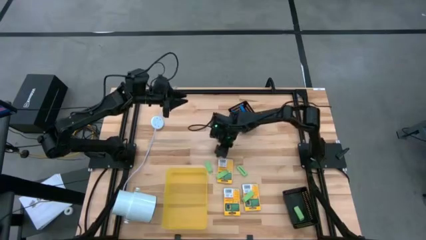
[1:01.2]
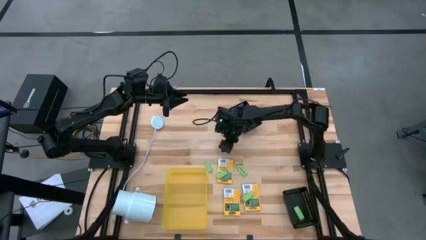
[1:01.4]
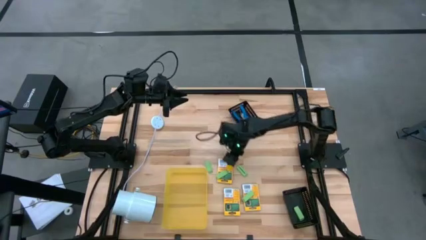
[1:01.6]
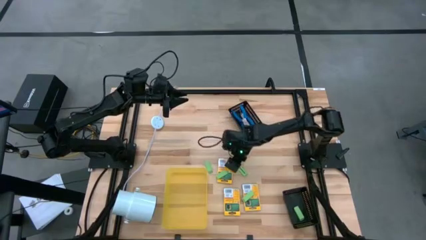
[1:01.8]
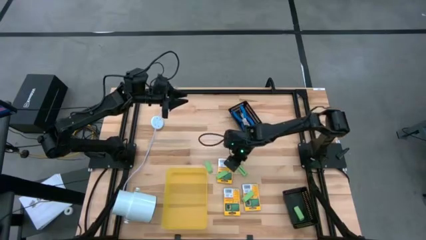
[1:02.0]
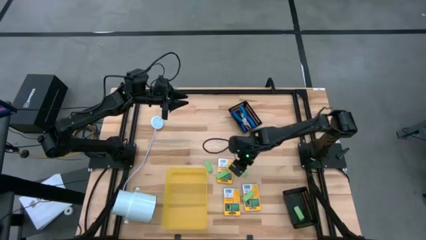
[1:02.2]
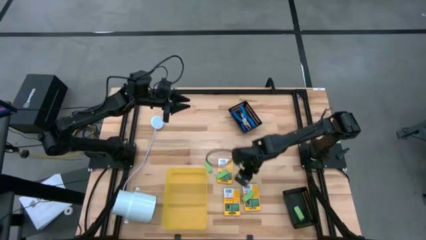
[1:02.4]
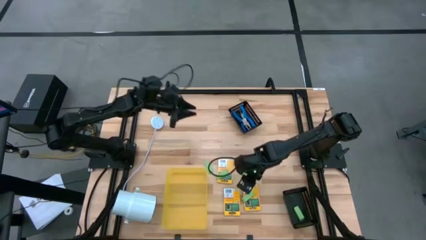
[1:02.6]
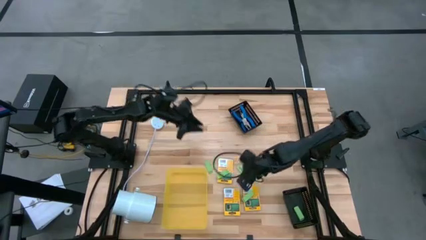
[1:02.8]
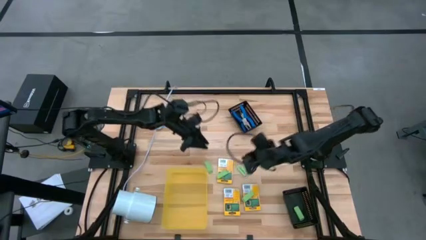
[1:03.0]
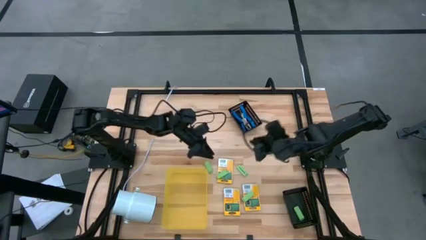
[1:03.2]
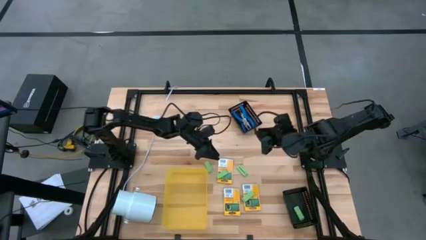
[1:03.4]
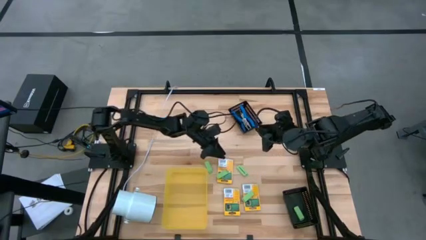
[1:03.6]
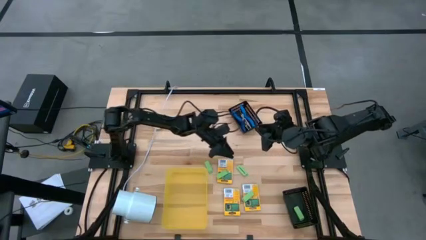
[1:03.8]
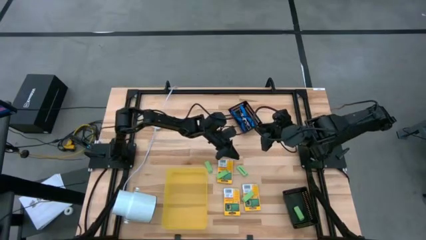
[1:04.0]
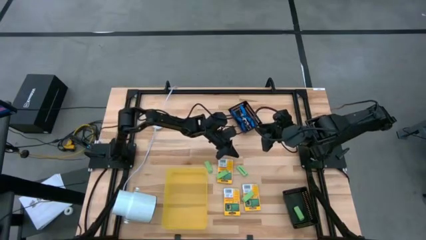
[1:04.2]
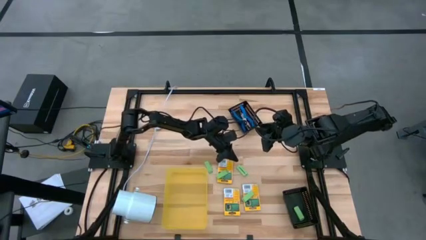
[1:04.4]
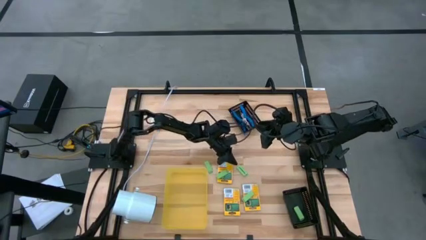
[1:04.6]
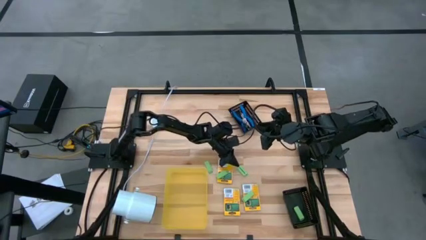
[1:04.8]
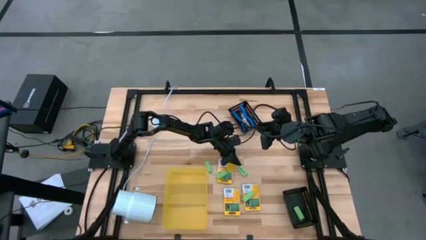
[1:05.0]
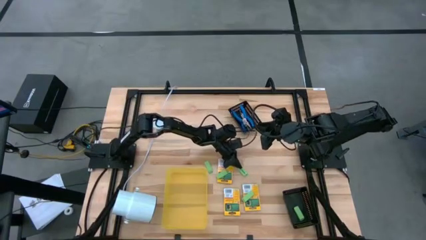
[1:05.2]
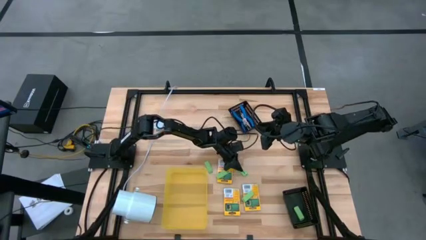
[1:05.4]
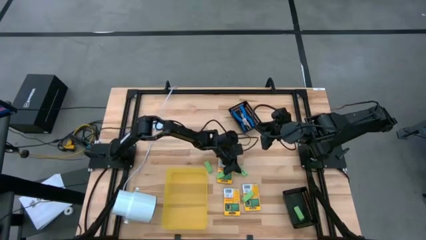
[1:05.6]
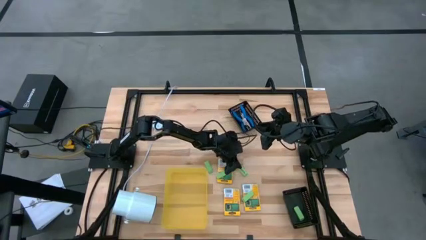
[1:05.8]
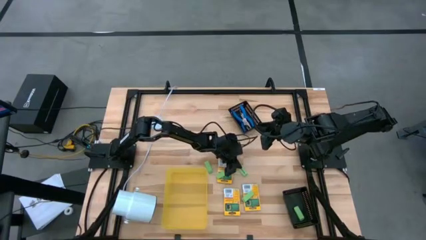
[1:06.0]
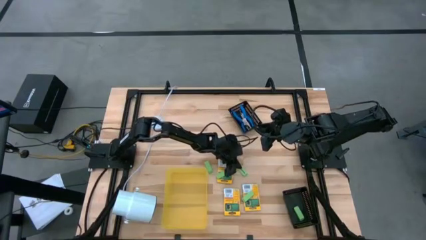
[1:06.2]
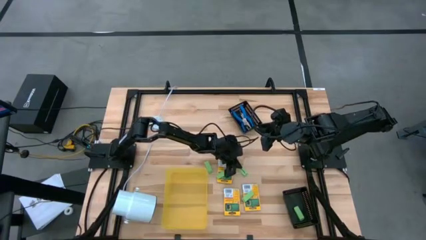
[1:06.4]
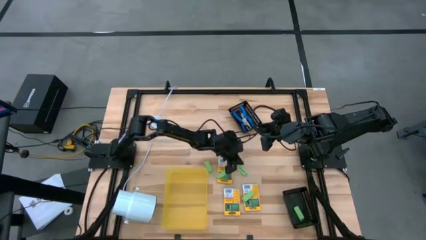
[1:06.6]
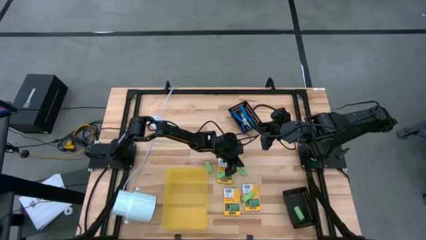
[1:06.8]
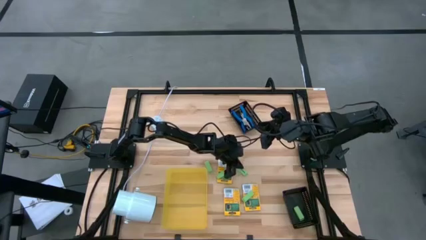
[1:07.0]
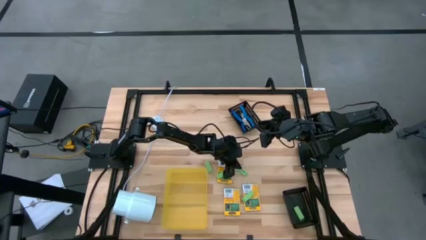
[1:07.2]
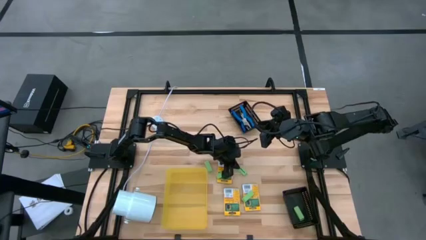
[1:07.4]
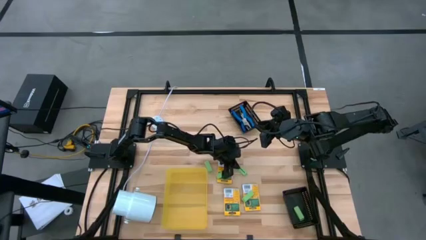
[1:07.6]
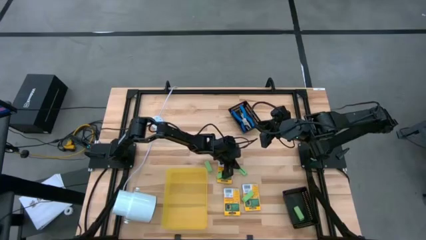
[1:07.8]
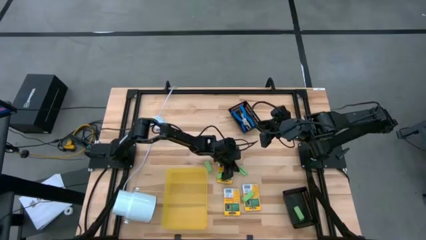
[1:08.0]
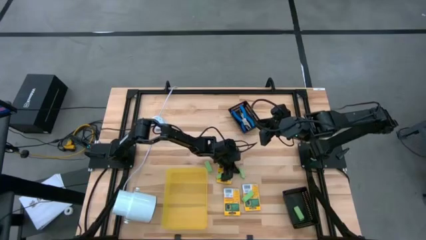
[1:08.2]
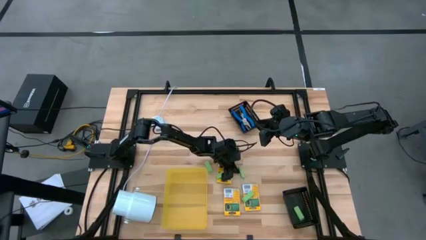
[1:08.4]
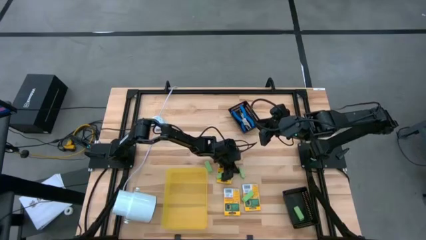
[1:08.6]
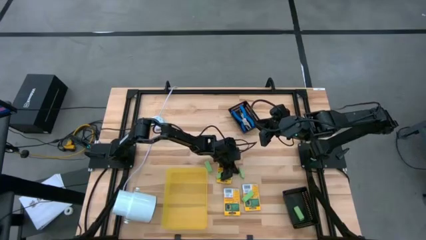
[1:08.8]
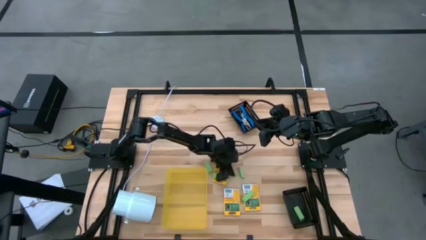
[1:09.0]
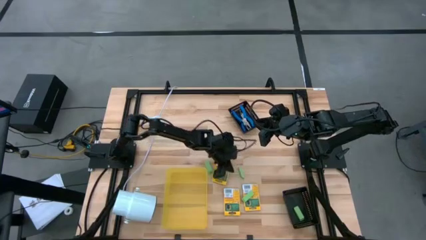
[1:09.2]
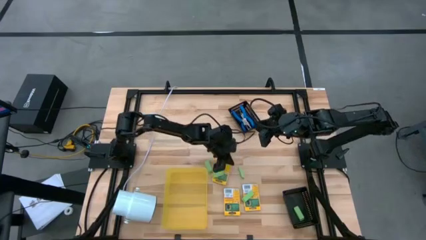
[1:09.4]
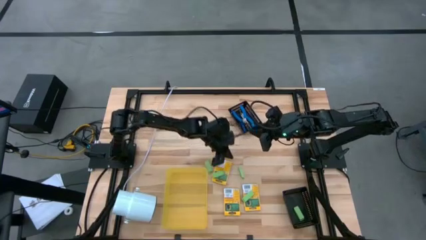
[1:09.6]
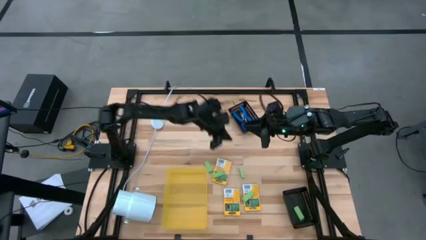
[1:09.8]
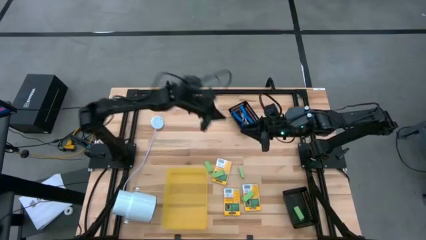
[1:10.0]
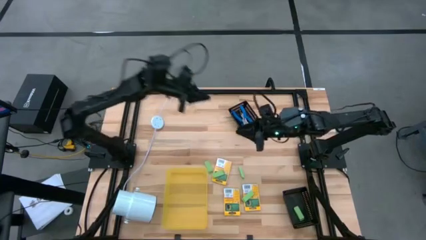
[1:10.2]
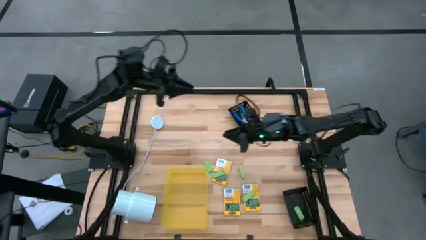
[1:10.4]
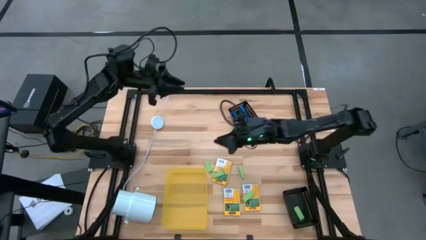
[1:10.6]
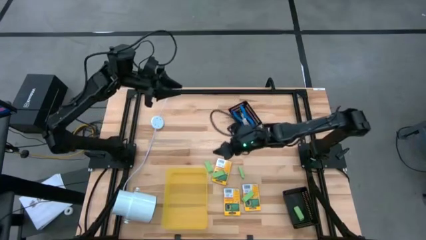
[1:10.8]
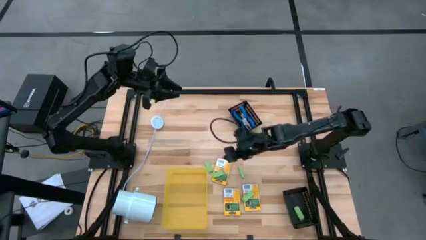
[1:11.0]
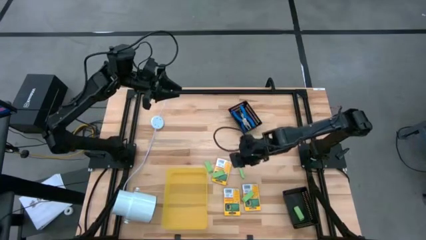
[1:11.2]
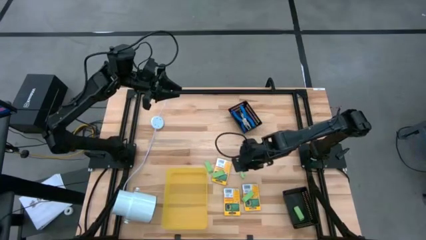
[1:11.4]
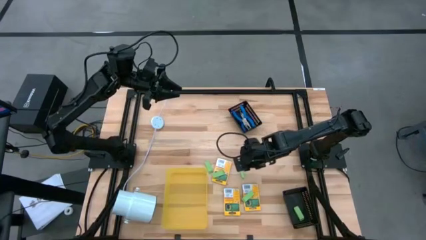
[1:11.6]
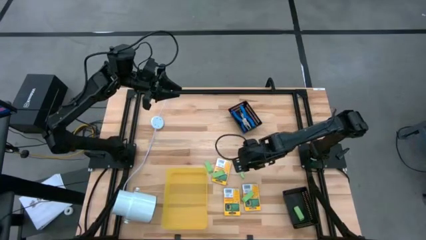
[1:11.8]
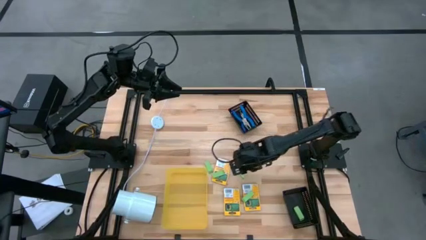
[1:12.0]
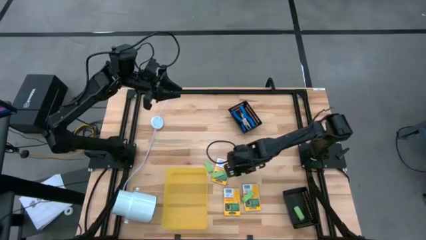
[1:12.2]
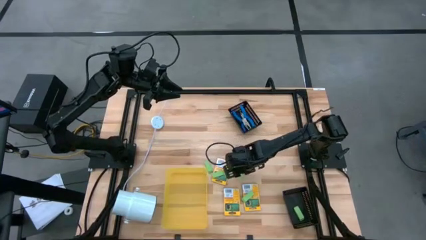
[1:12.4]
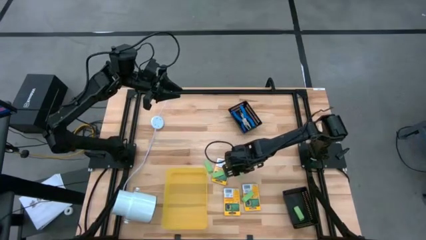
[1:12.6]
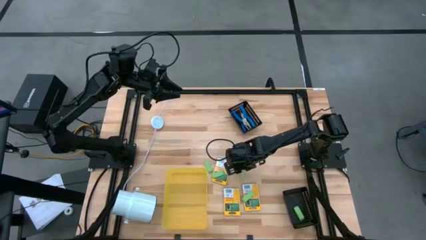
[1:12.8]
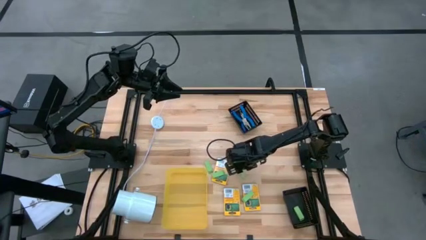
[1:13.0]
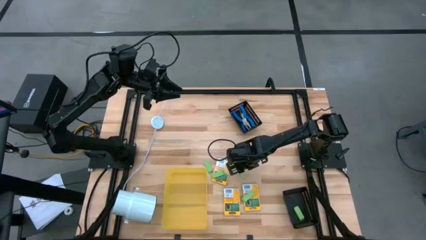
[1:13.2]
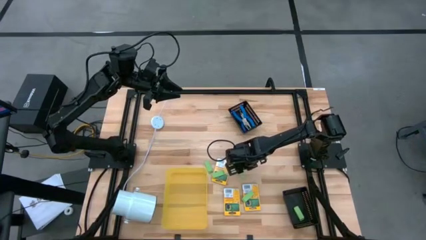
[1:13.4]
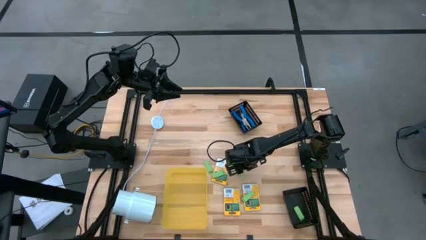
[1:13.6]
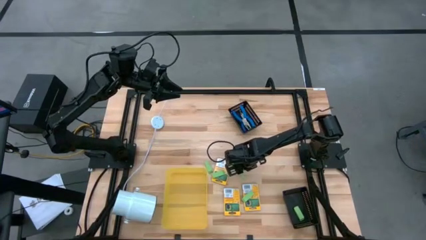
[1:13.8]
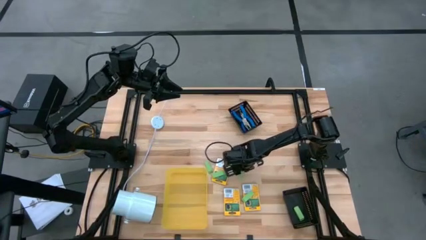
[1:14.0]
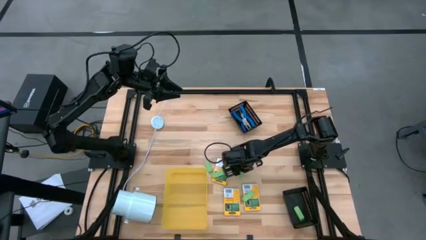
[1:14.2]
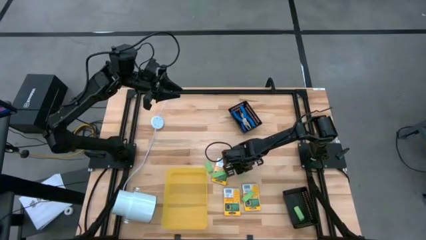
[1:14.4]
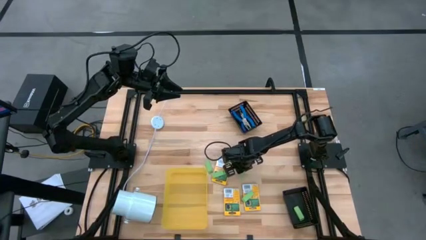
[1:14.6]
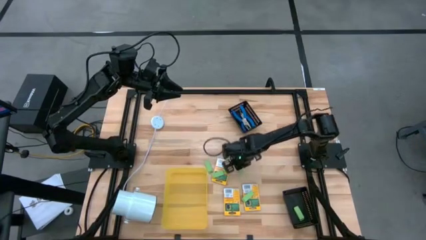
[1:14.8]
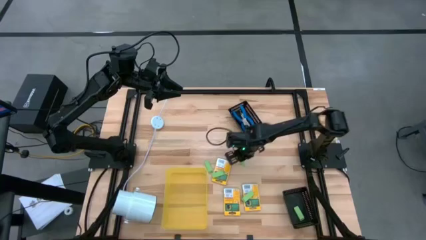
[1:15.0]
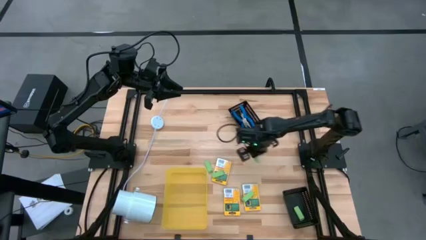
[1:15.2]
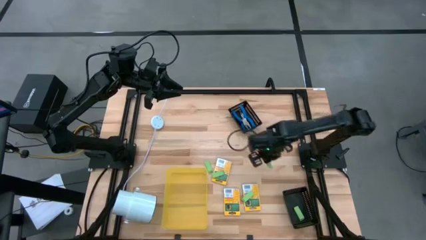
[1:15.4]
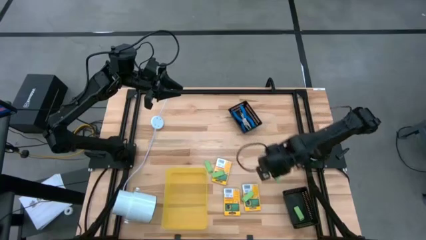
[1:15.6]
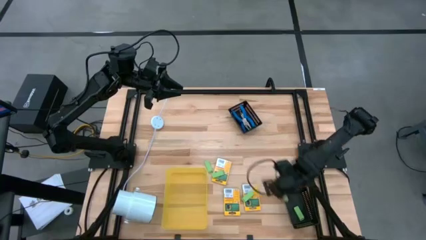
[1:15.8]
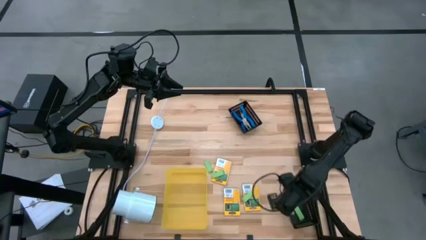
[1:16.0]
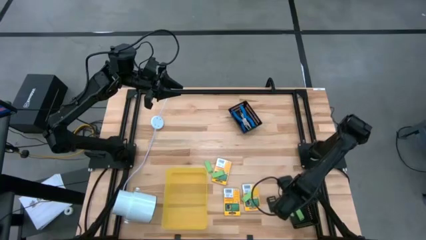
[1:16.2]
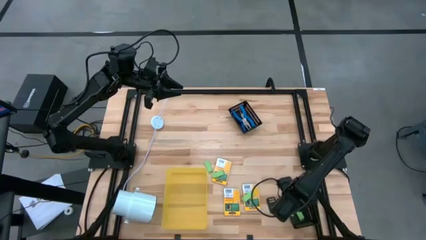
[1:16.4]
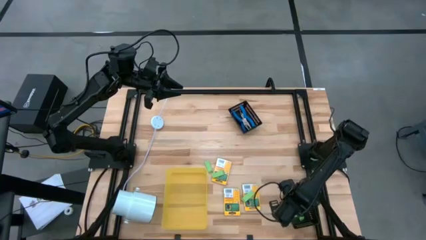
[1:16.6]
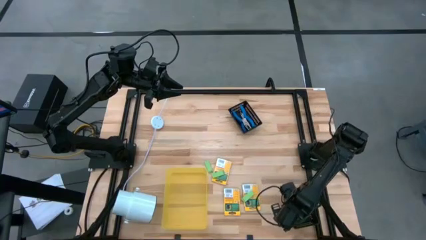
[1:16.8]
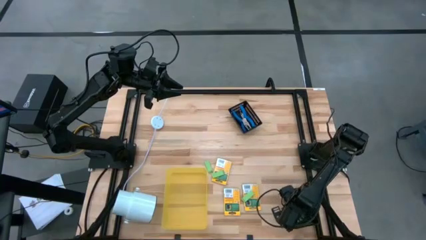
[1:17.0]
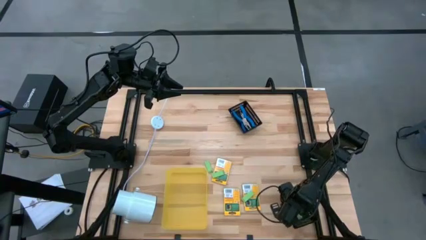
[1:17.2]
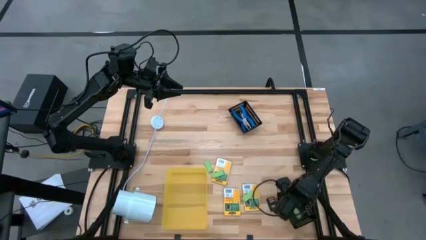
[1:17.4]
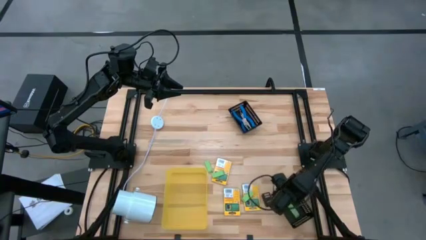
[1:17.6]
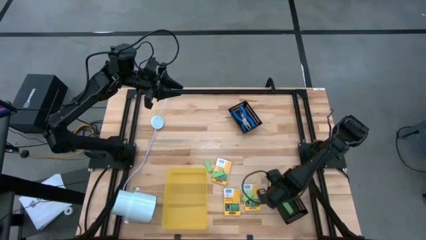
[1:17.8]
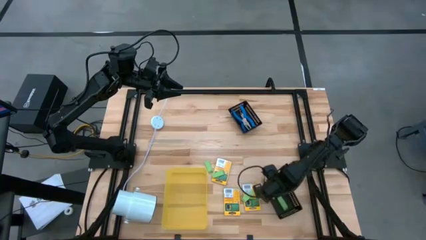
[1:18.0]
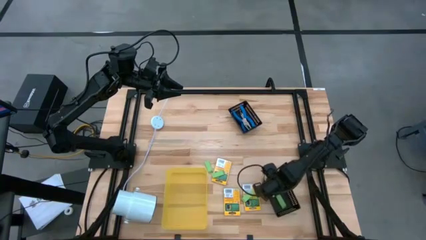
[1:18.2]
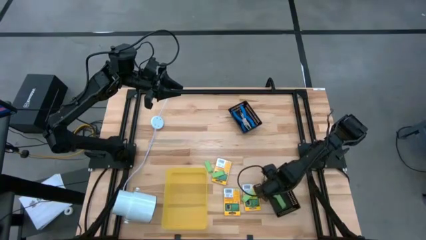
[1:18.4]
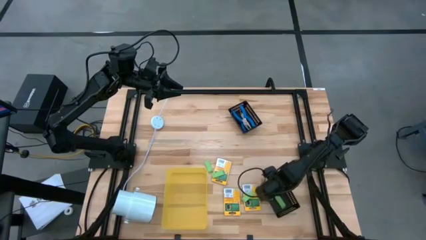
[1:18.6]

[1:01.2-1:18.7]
Task: Pick & Place School Supplies
Put the green eraser into the bottom black bin
